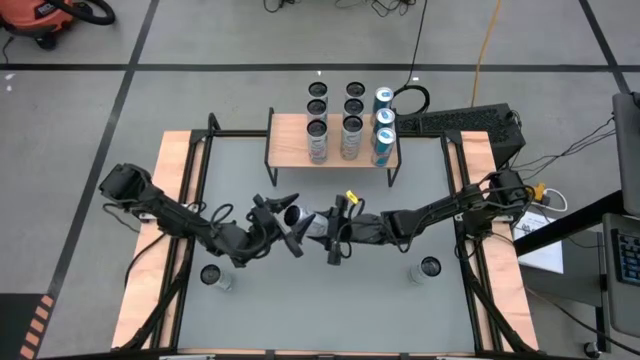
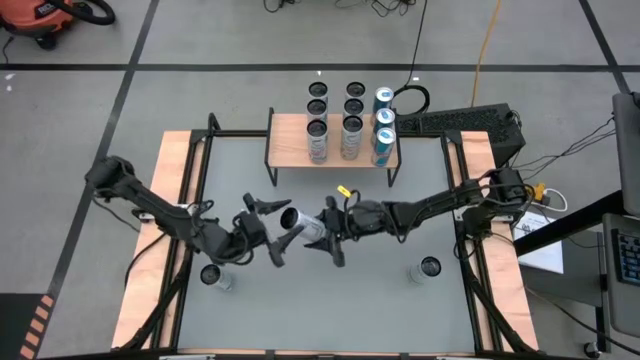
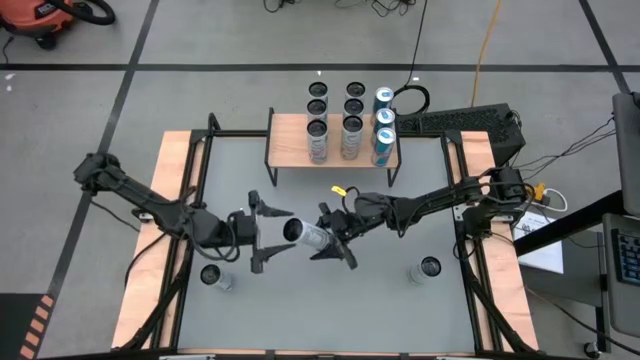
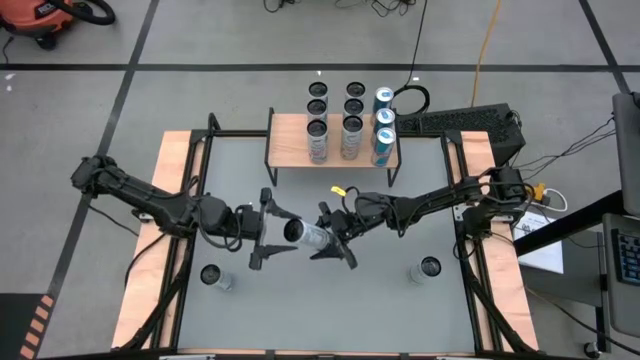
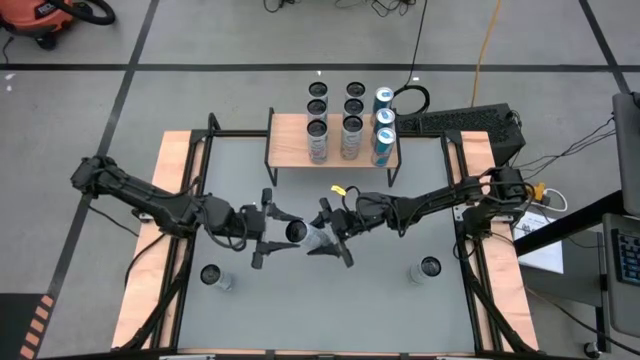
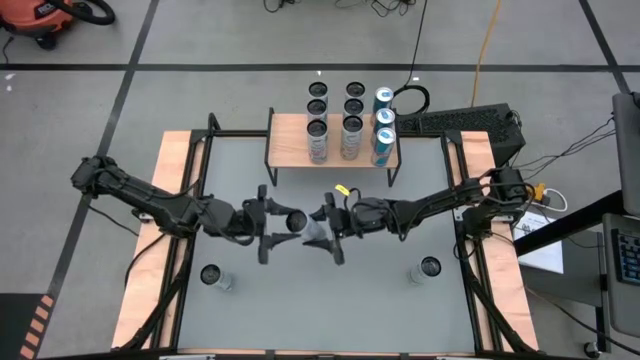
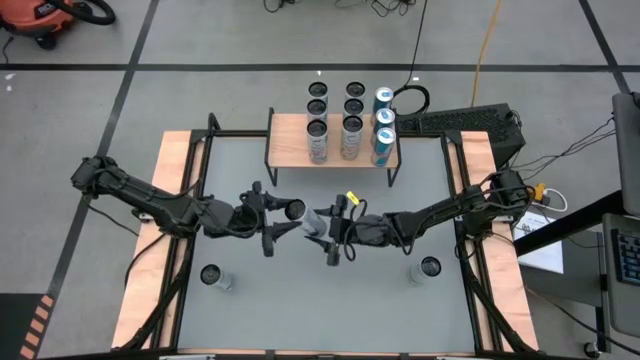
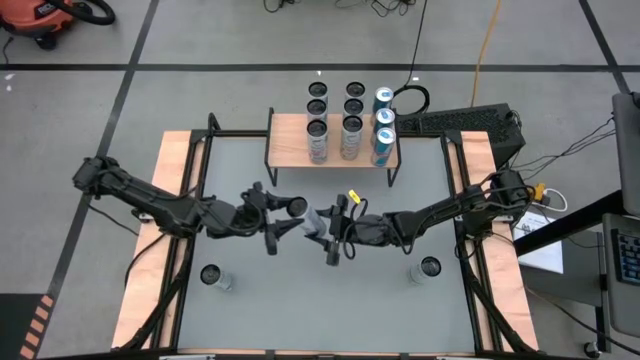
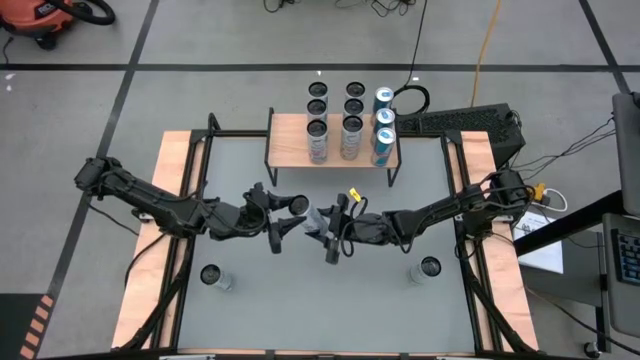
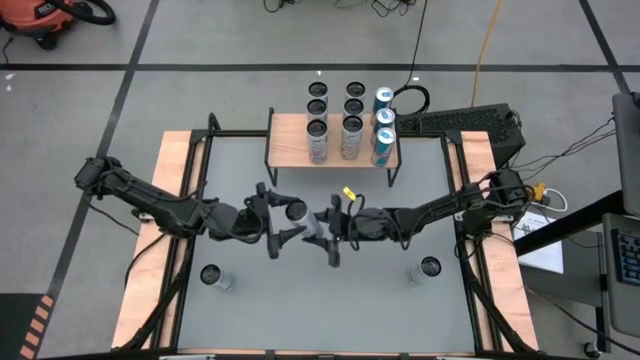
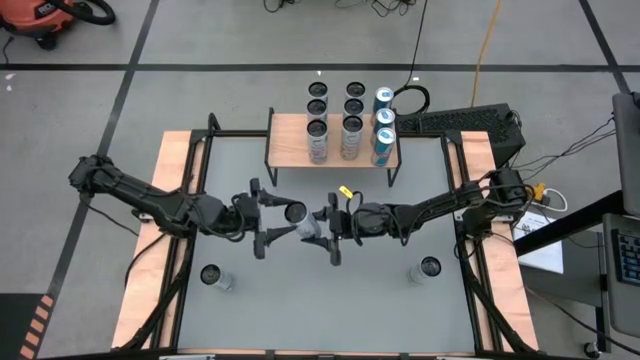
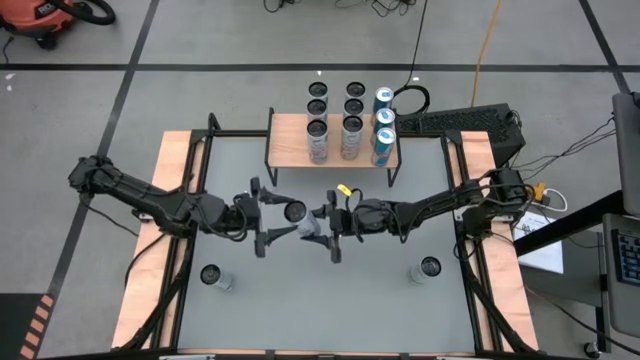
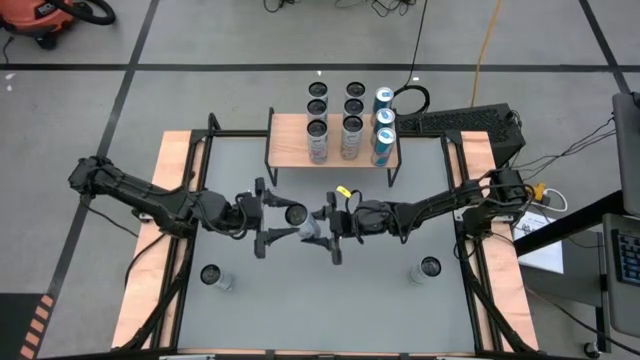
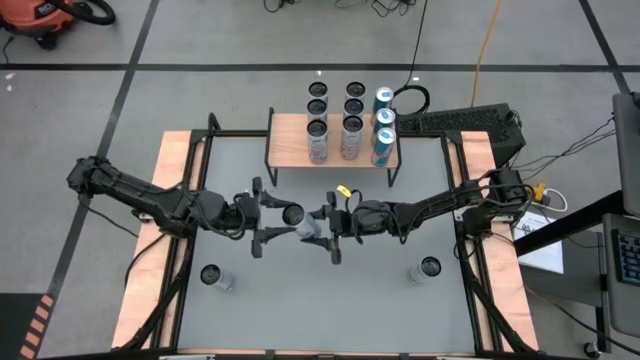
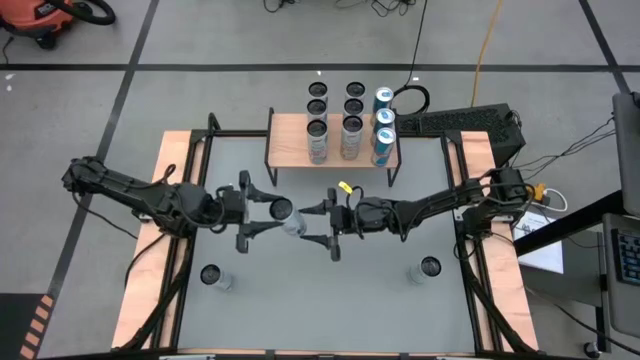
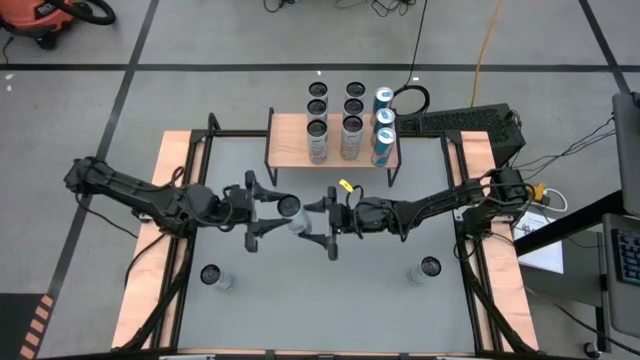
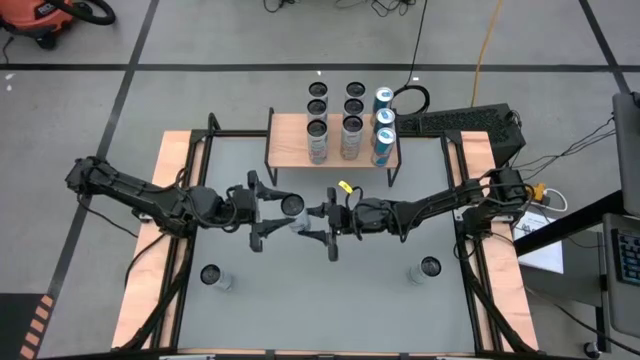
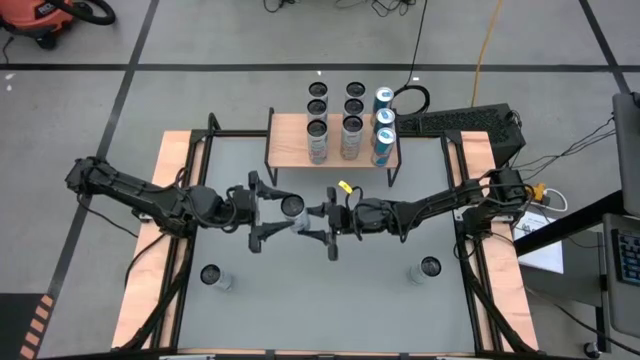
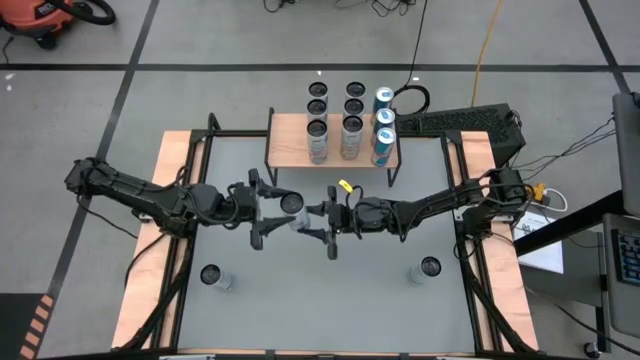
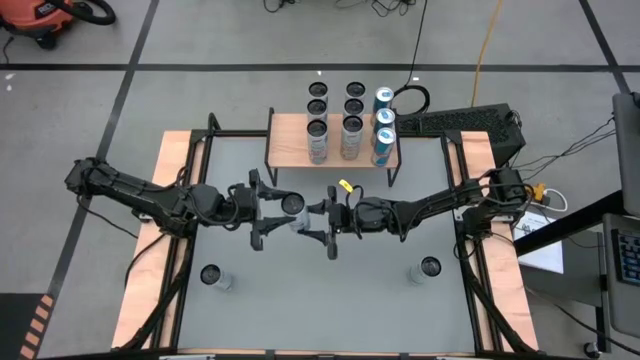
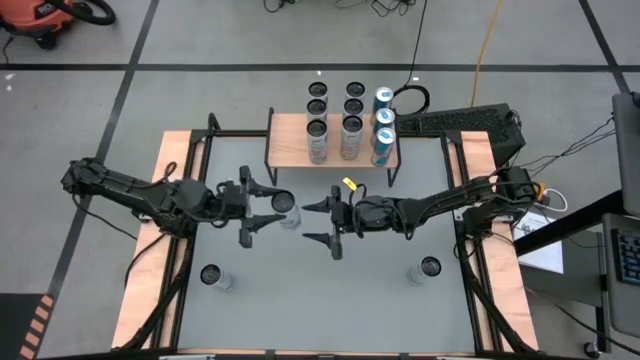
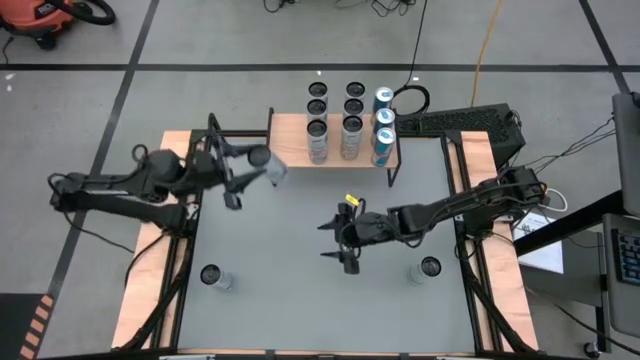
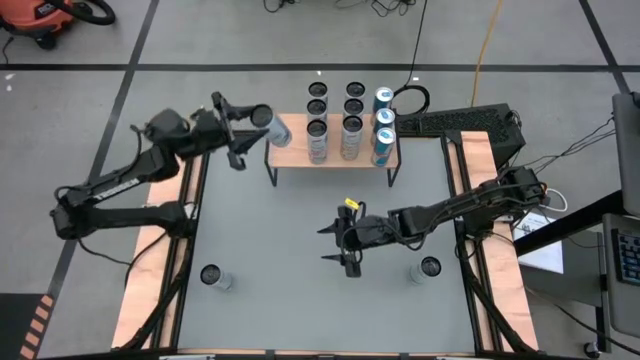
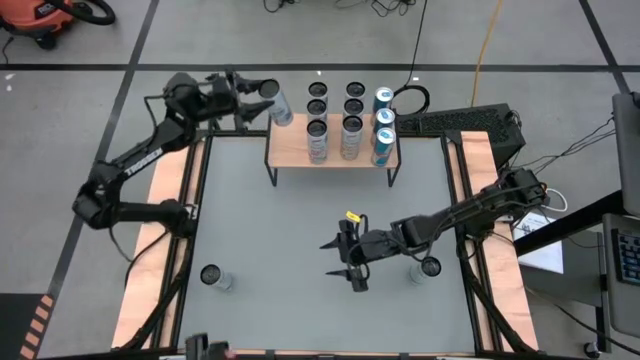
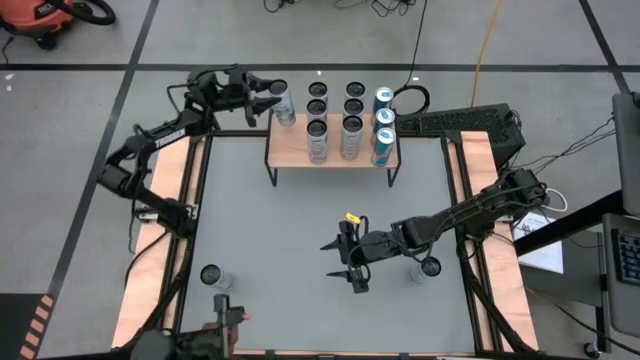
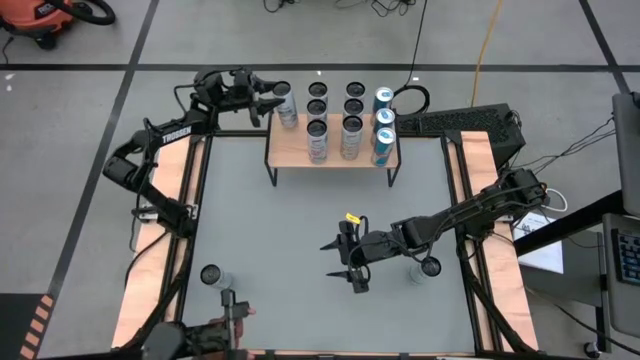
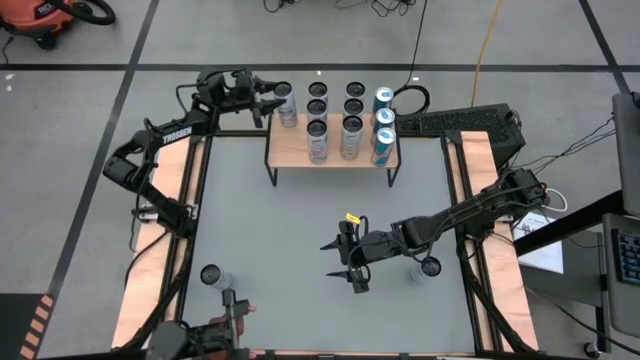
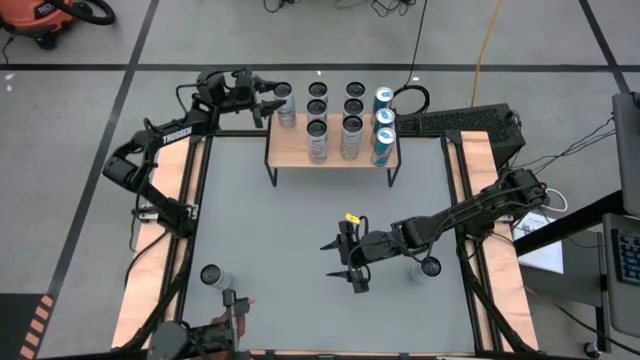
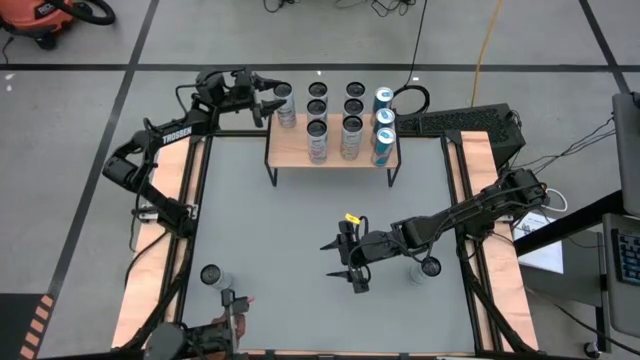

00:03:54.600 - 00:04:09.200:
Task: Place canned beverage on shelf
Put the top white blue soda can on the shelf

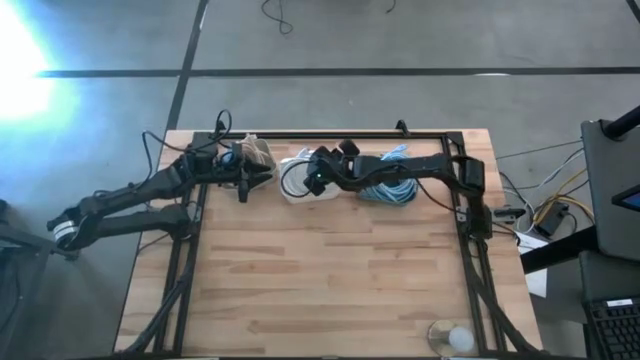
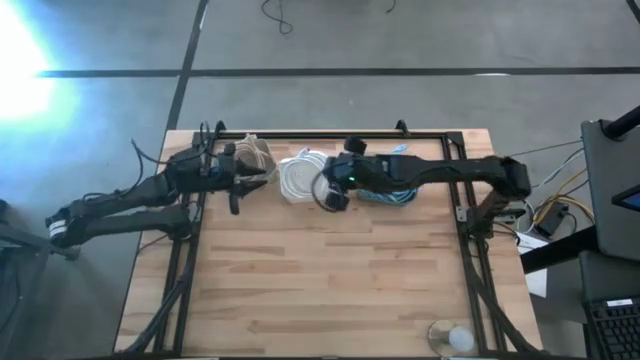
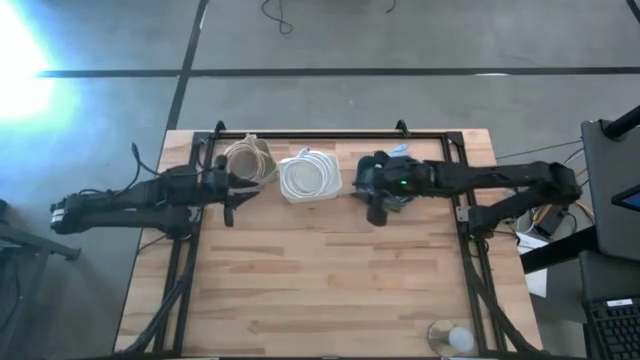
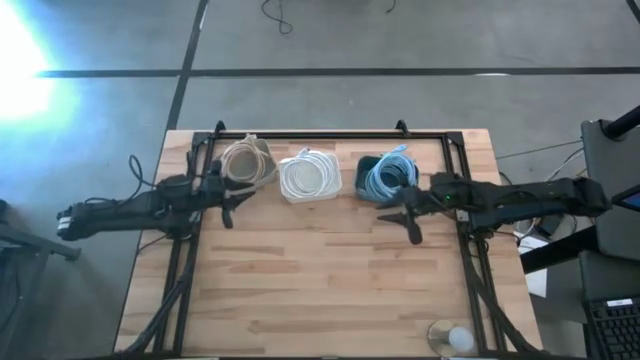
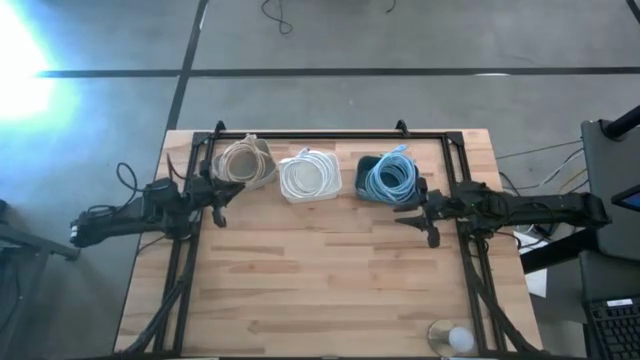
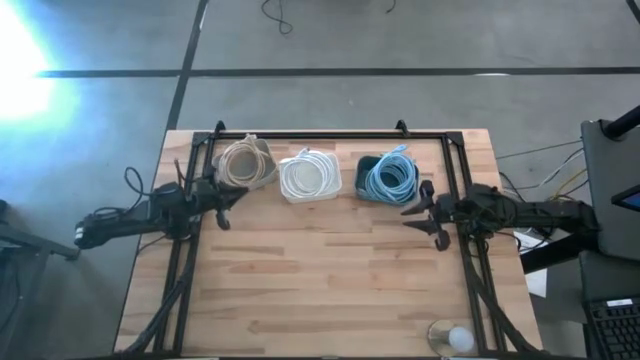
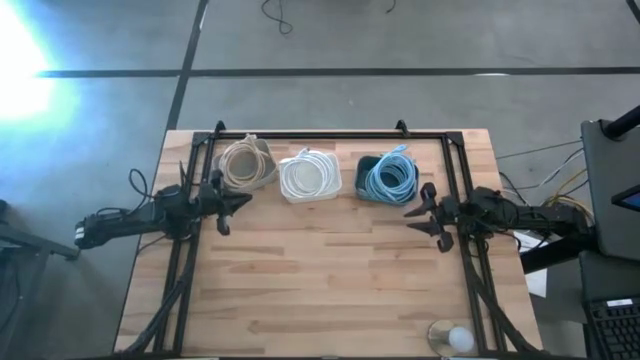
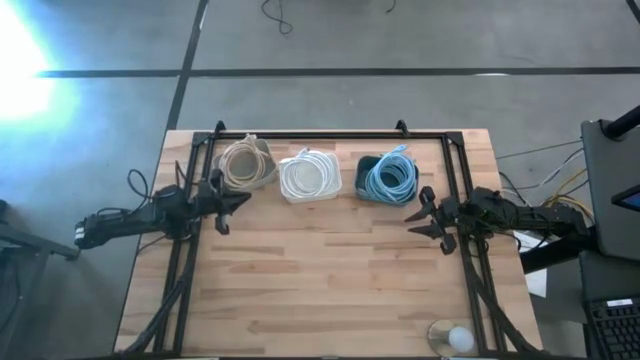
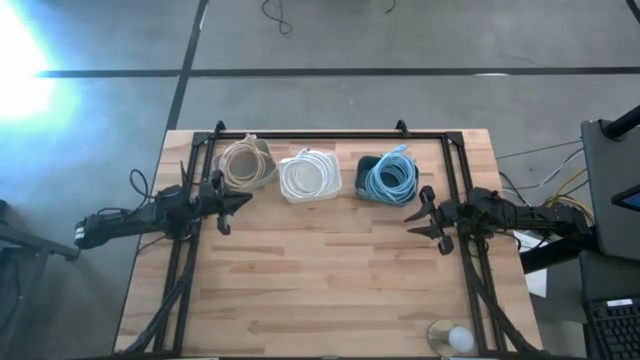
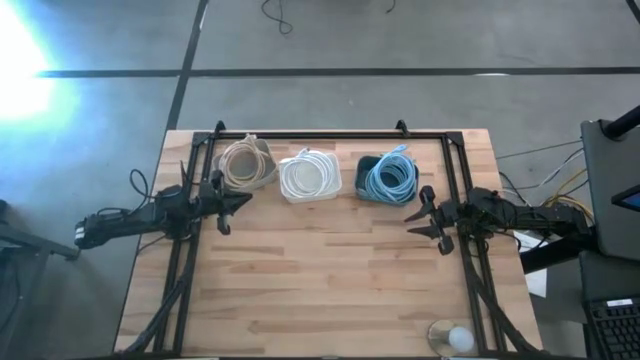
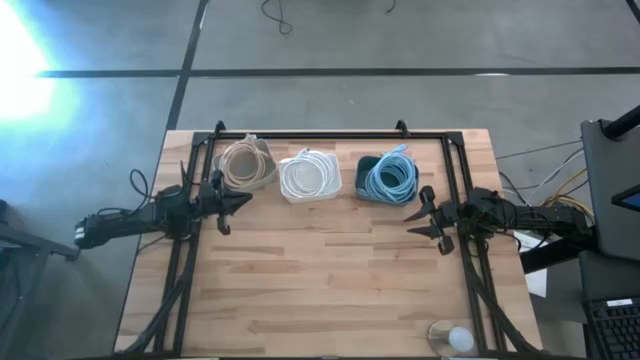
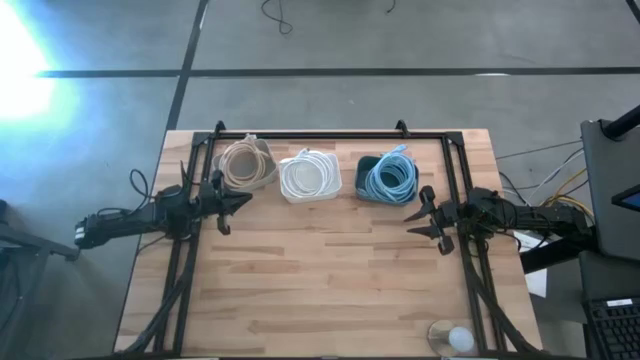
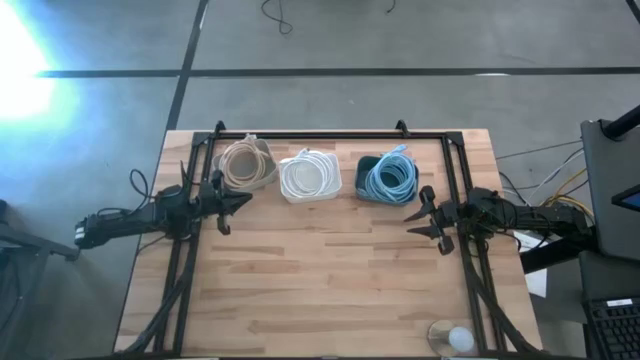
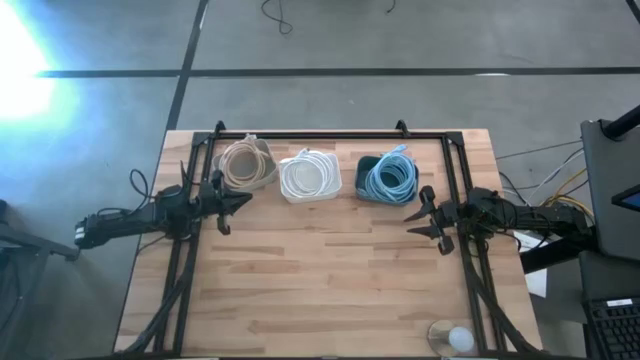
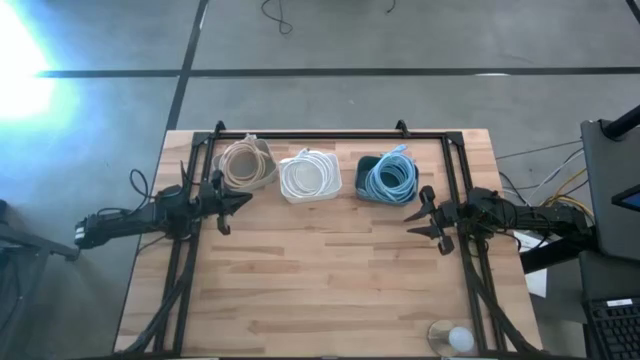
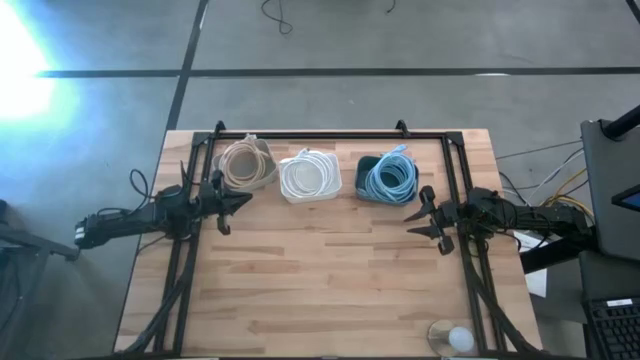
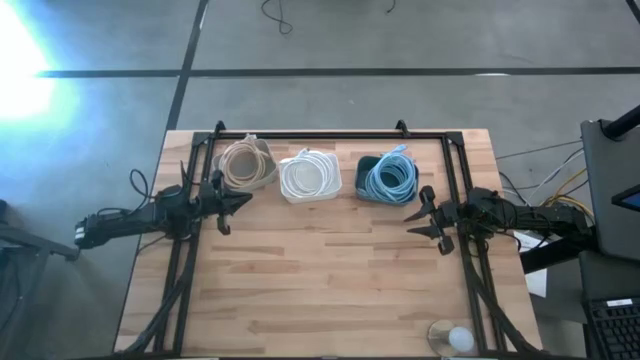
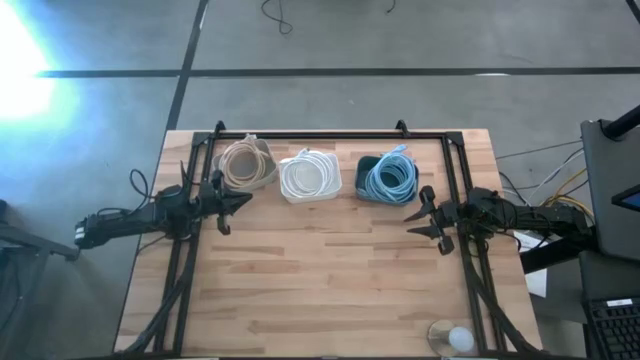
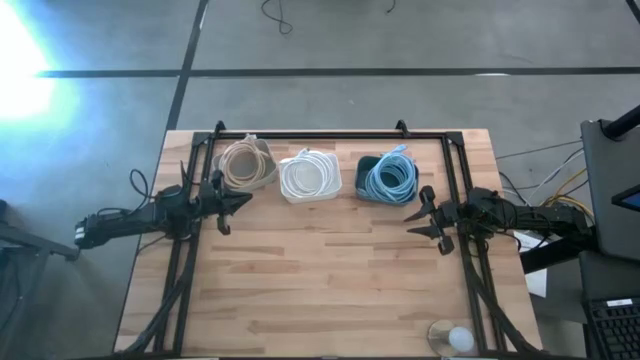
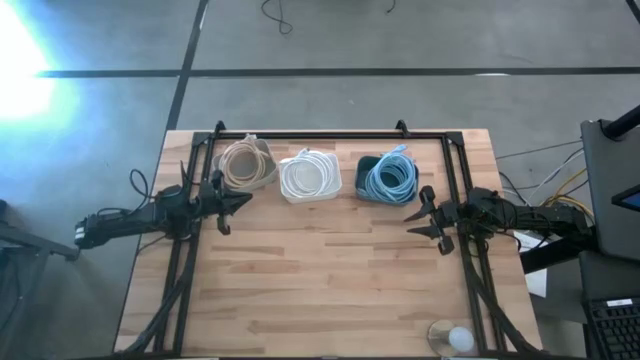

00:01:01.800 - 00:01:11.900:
Task: Sort HDMI cables
Return to Home Position
